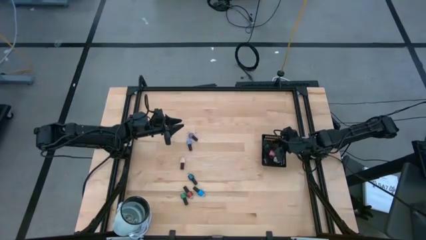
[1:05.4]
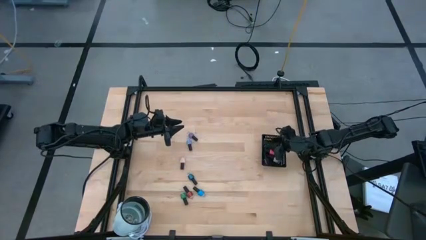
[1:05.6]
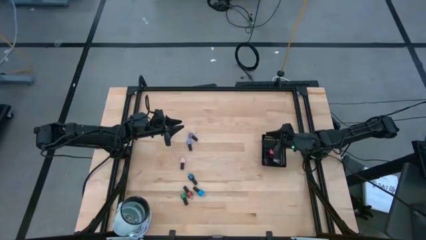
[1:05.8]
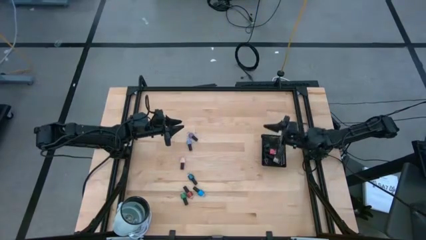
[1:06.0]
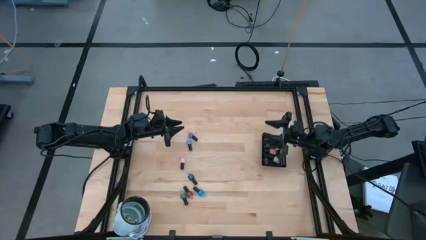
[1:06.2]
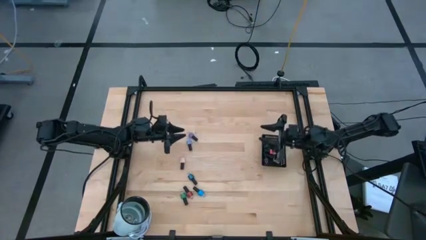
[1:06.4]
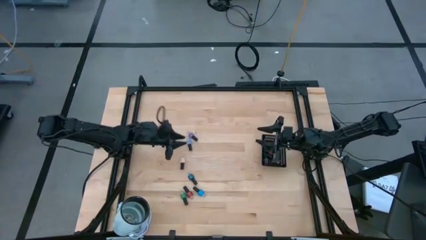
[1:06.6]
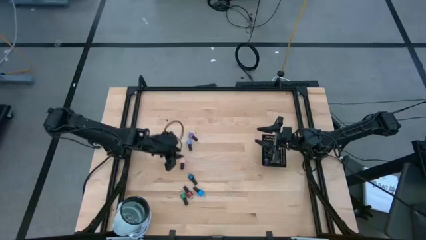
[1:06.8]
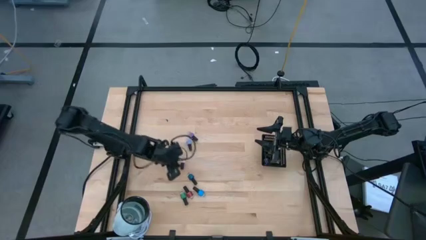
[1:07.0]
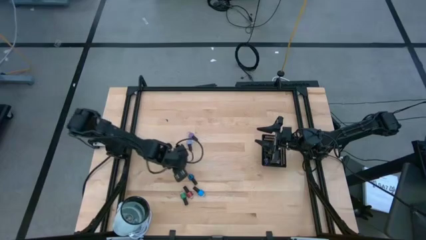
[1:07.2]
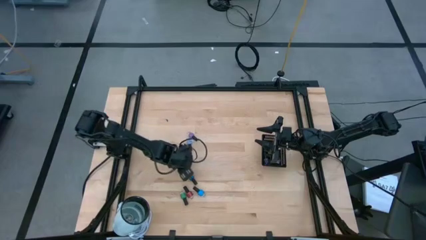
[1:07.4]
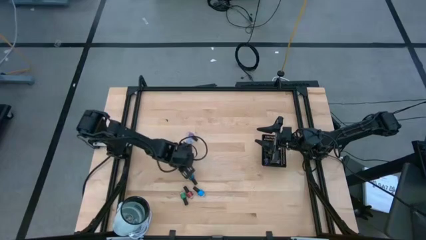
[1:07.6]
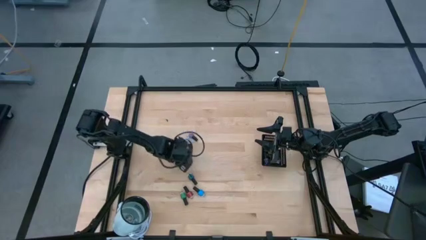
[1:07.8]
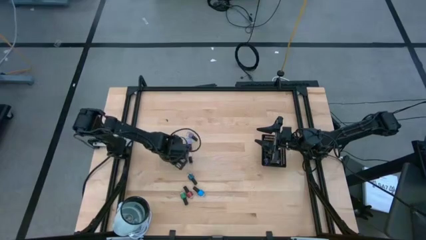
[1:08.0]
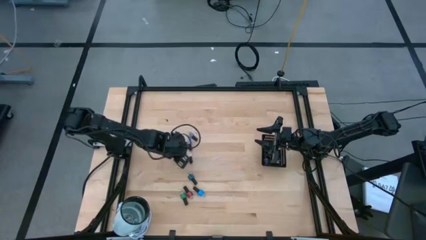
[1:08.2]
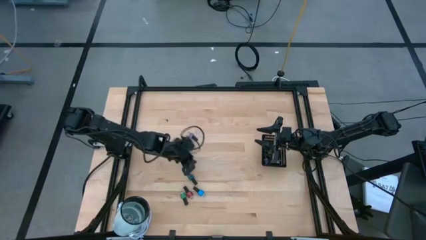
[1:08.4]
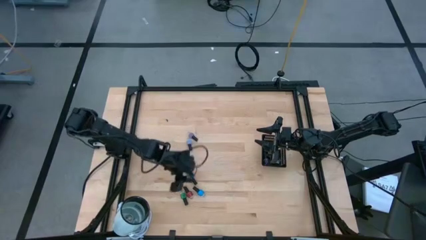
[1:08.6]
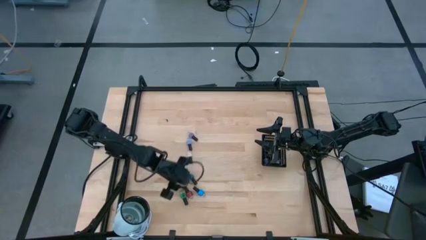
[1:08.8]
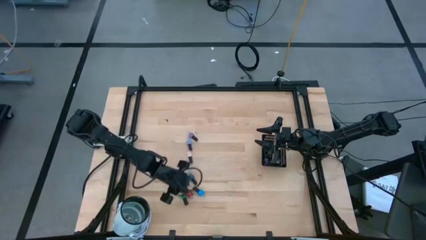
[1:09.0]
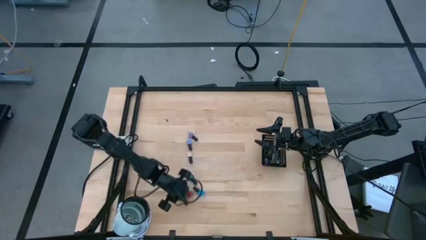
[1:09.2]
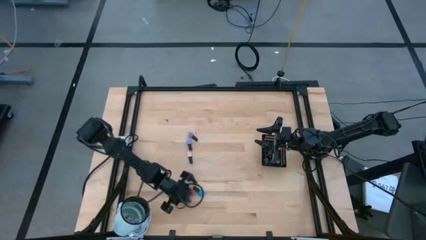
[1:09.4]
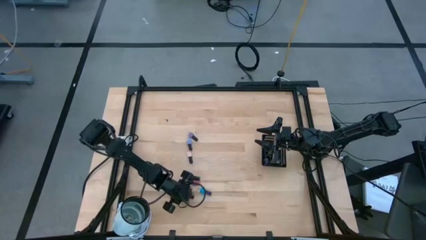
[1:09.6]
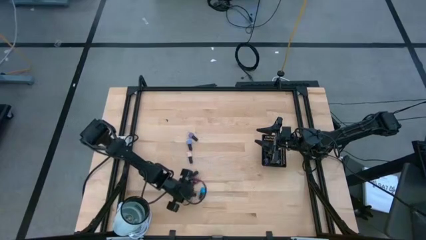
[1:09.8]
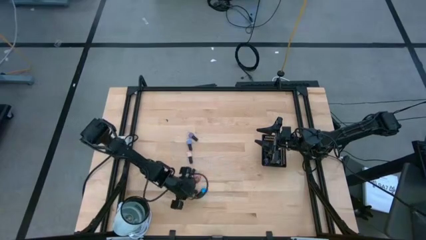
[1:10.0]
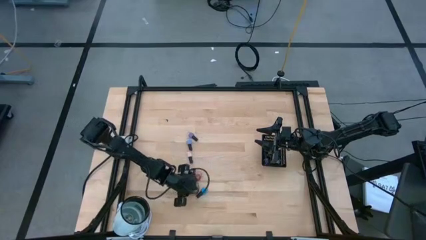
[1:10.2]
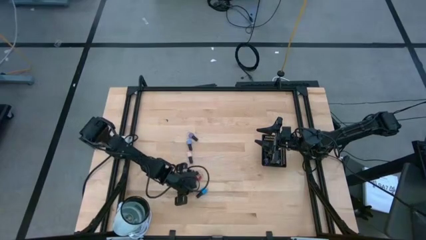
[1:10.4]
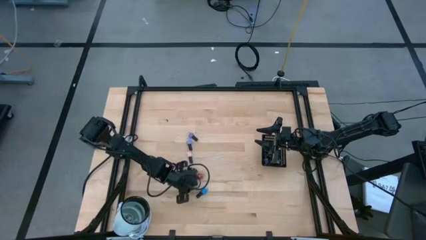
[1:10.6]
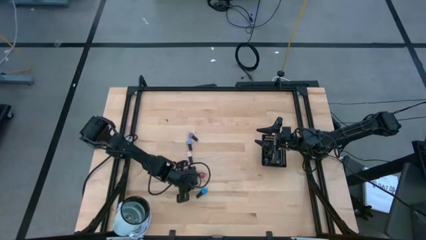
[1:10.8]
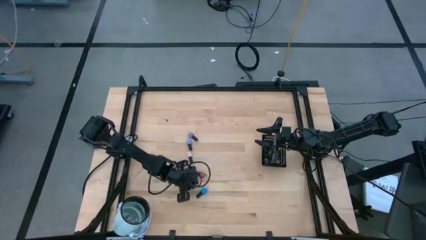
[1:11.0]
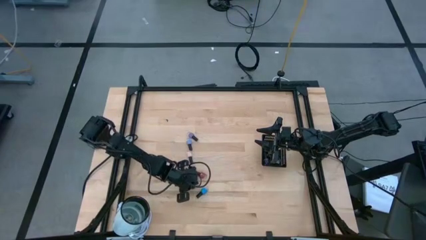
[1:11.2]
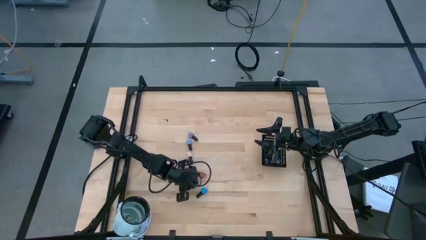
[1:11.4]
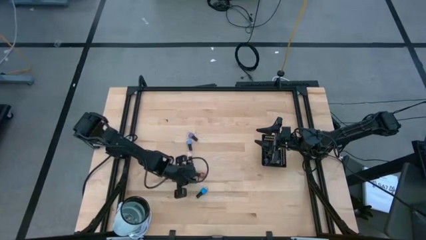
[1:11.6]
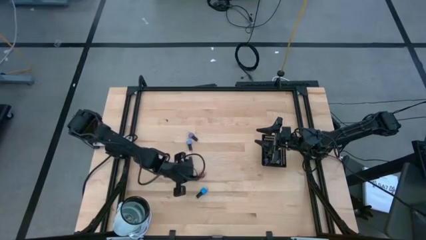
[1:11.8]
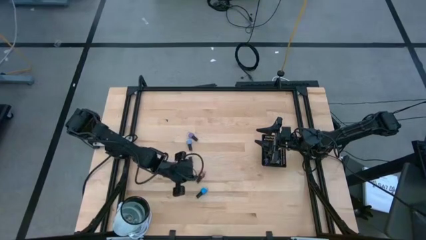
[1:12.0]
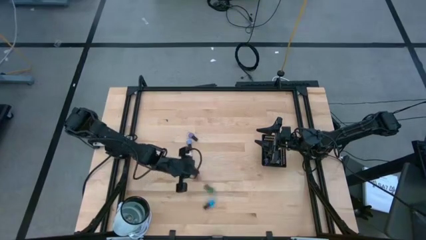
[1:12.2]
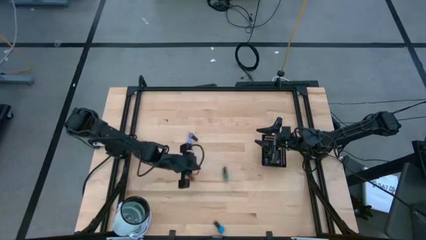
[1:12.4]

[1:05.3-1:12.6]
Task: Pick & Place Nail Polish
Put the green nail polish into the black basket

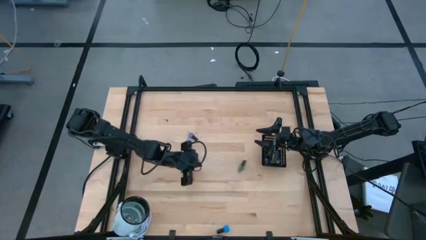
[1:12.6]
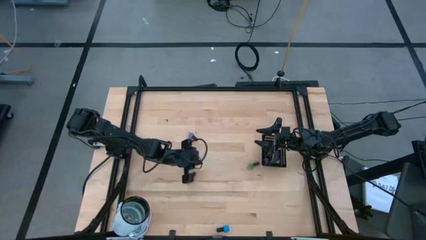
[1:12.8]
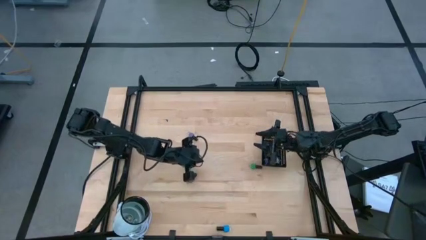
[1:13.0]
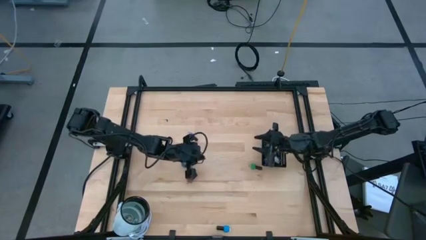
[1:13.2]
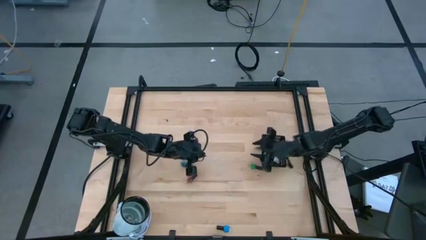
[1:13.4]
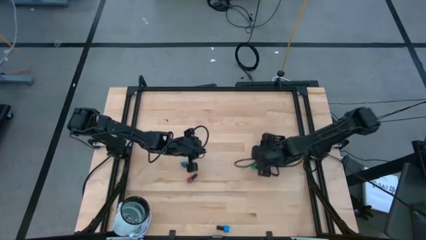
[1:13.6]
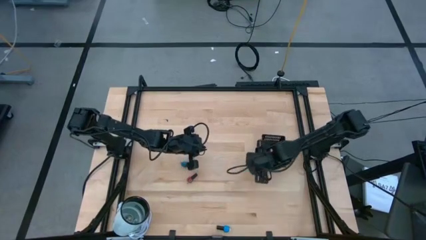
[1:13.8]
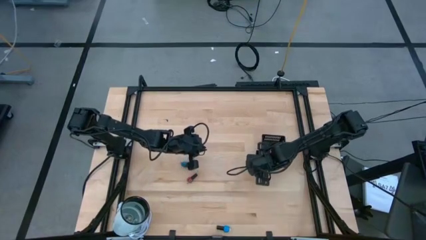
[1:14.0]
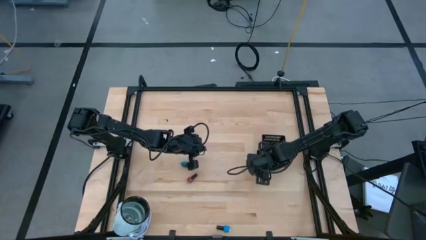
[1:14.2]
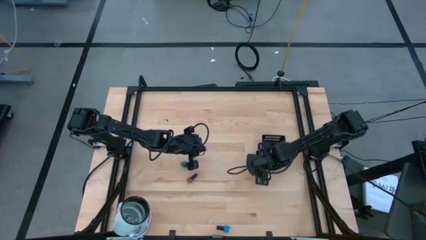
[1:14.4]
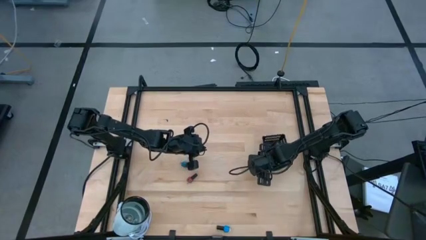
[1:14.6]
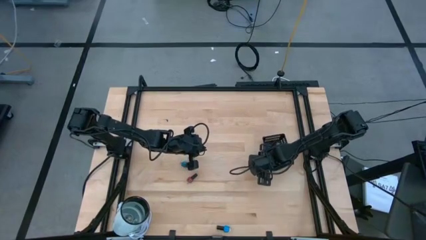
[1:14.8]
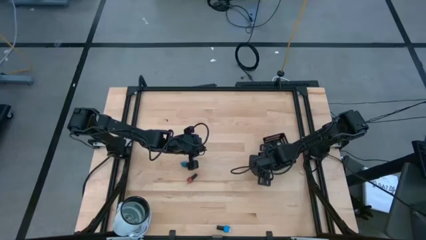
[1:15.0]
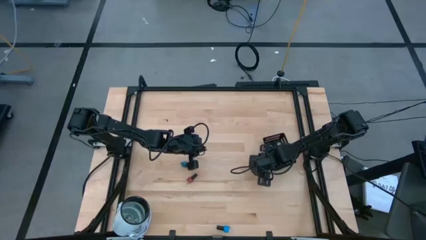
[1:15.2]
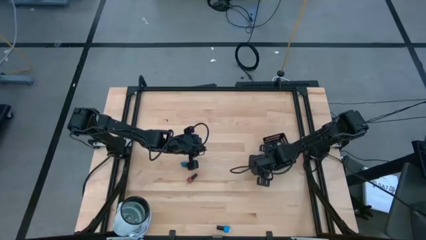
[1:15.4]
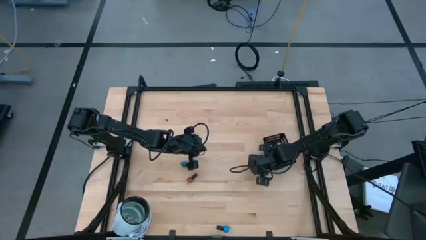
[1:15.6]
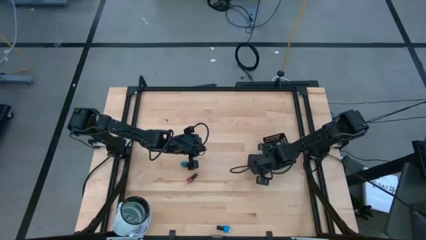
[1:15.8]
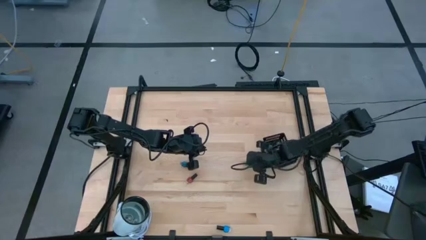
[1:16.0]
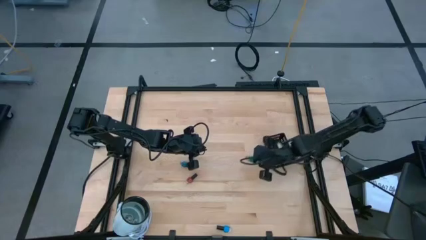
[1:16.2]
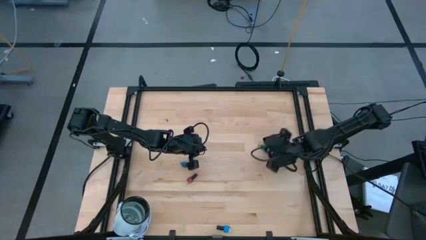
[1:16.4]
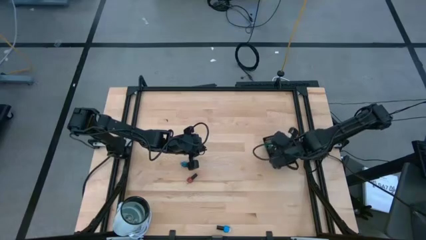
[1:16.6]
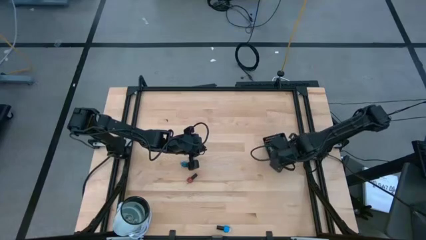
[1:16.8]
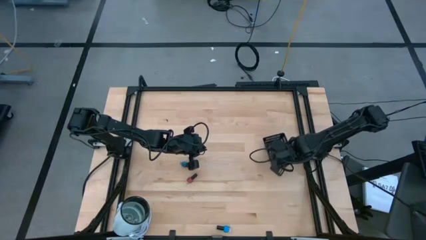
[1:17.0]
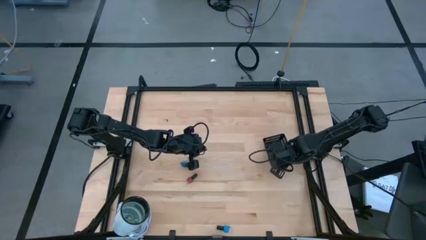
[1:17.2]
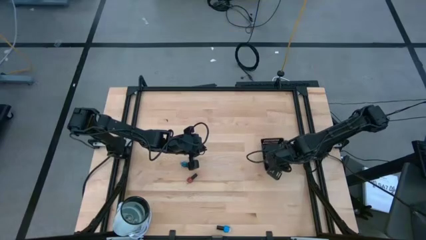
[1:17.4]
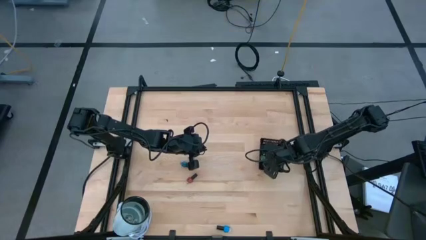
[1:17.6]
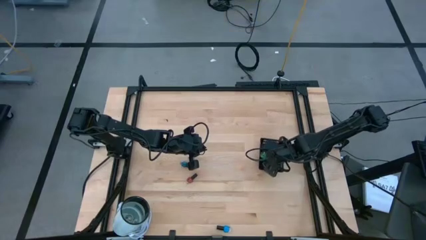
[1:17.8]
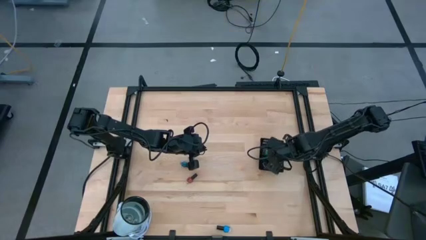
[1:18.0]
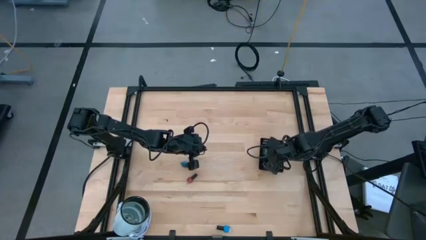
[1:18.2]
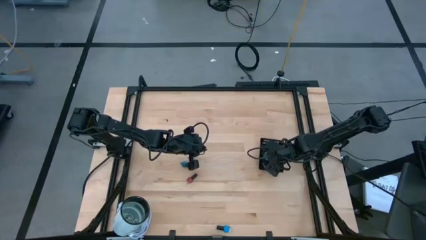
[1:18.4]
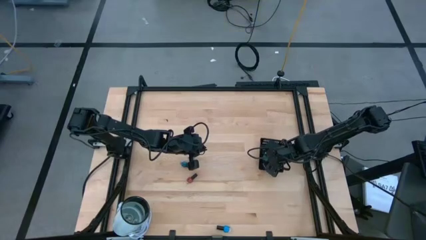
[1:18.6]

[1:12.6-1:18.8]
Put the green nail polish into the black basket
